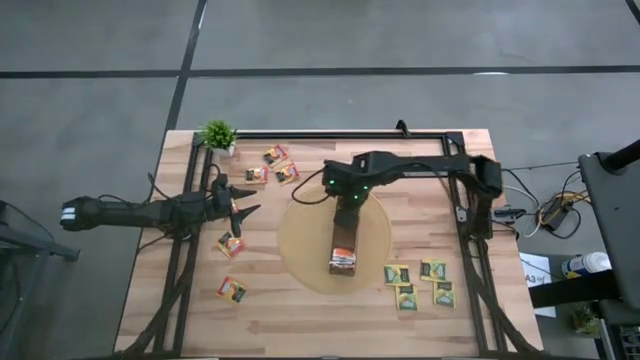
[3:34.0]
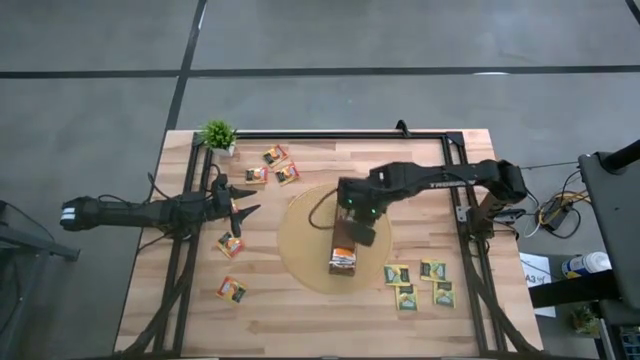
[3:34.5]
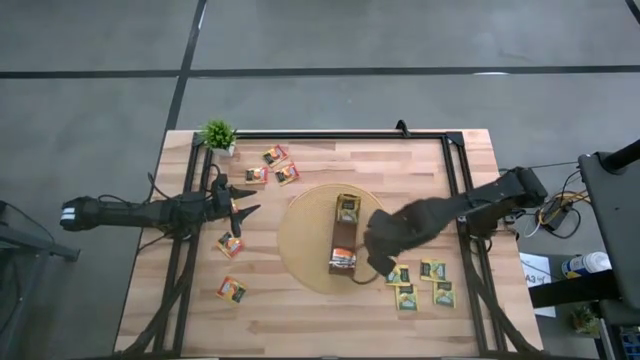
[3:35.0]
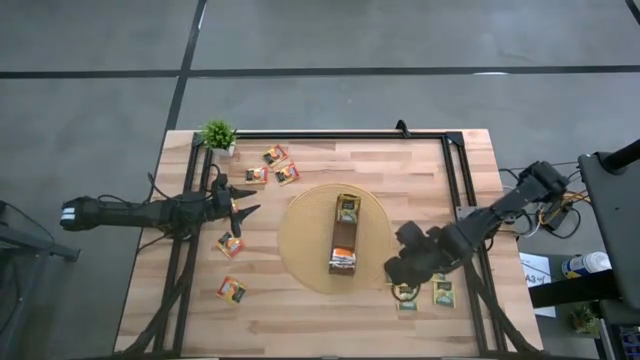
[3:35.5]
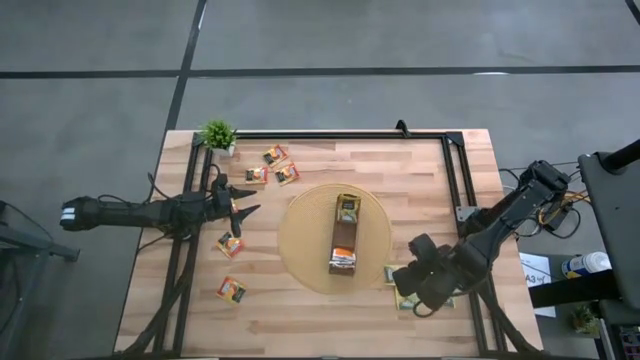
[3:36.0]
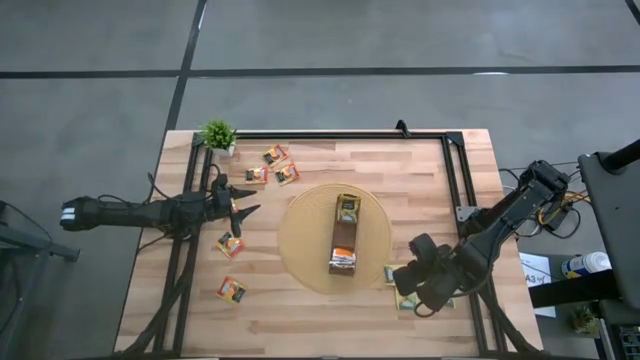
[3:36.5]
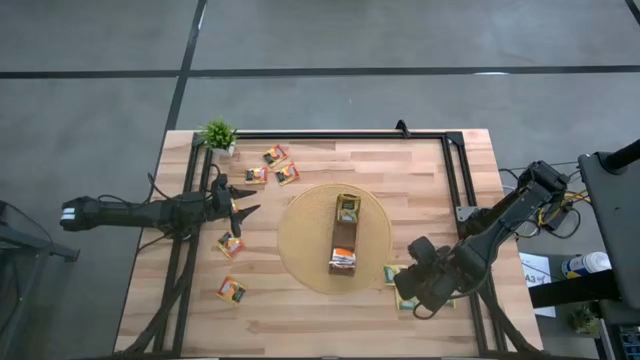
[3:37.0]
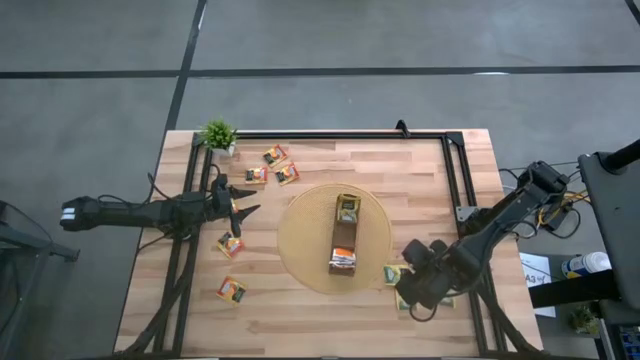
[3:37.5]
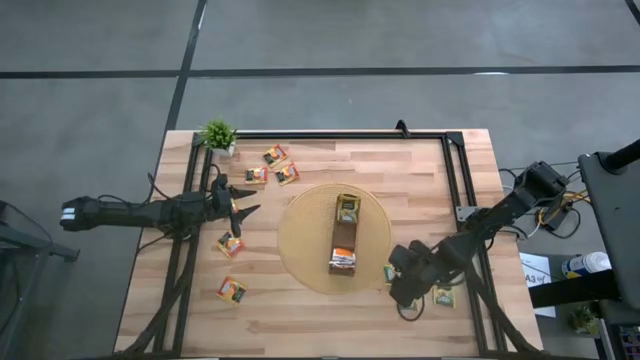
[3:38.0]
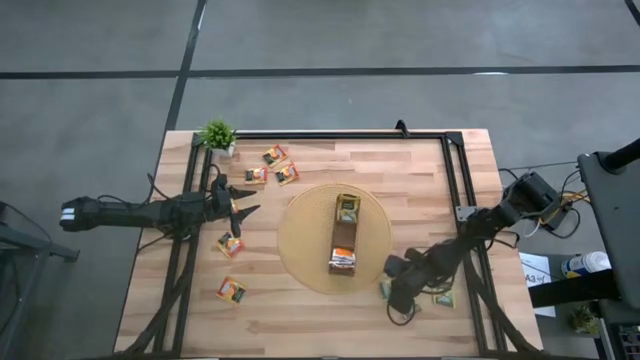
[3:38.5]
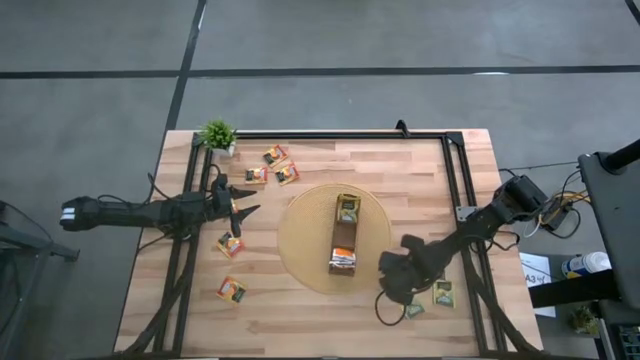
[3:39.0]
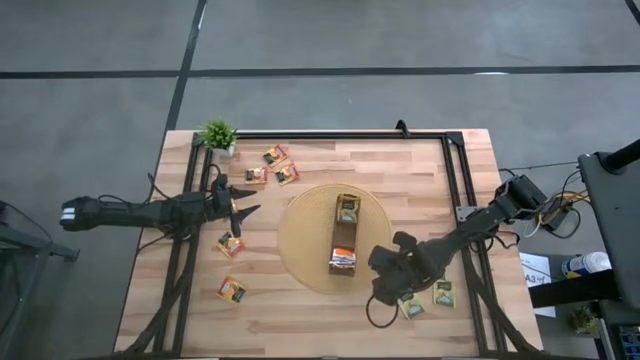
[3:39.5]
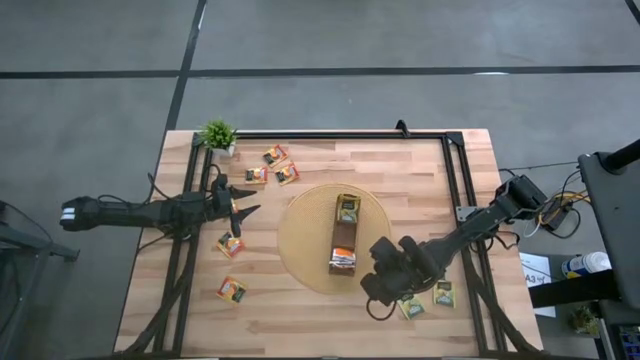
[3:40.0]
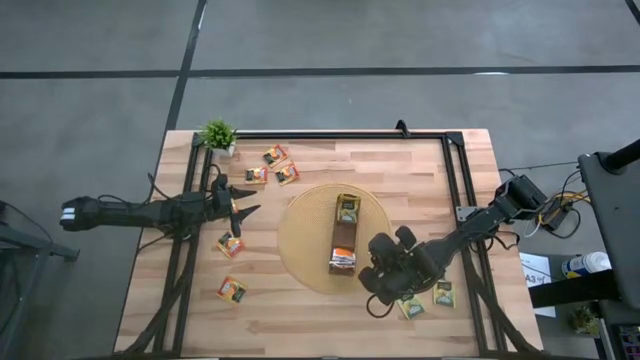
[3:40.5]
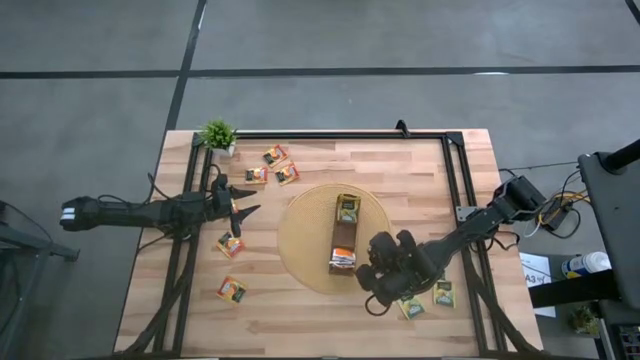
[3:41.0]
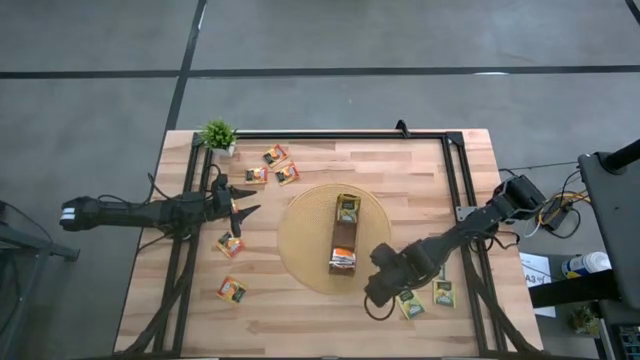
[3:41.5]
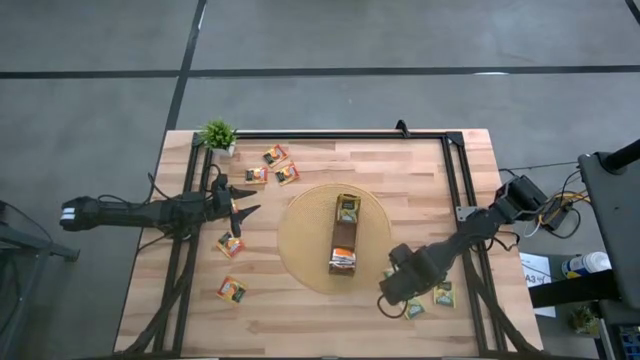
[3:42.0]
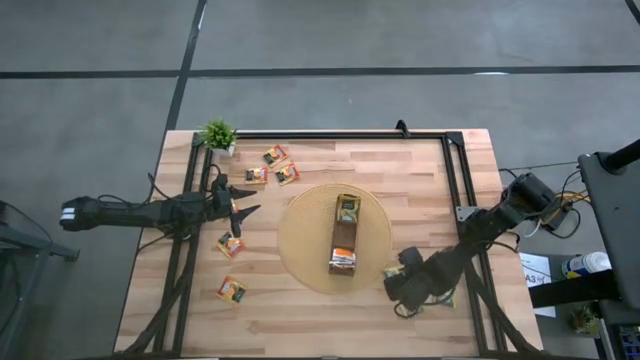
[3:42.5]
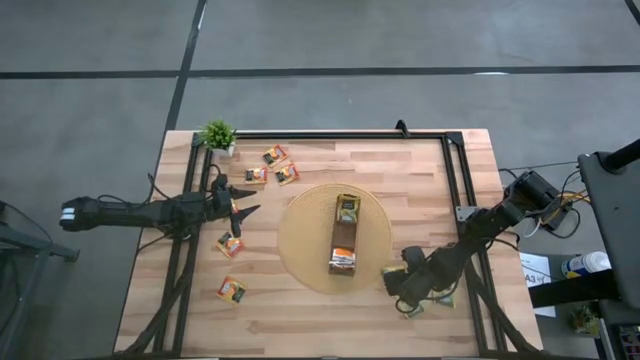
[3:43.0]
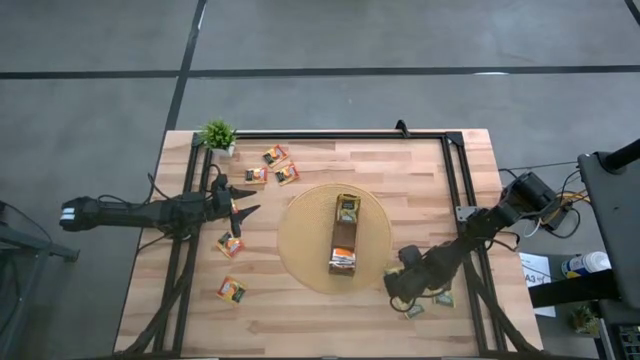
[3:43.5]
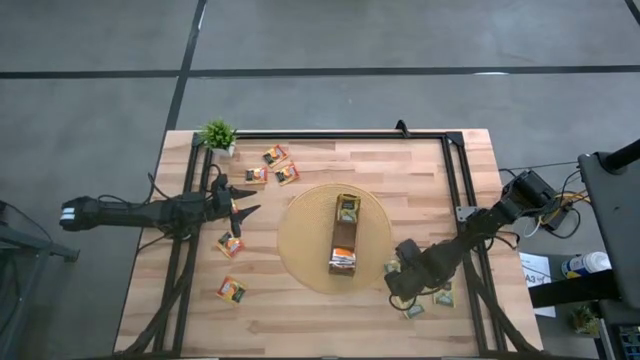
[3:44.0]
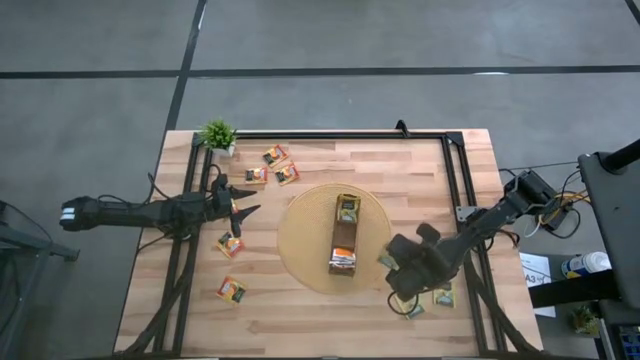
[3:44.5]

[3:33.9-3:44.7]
Task: Pick & Place Tea
Put the yellow tea bag into the top section of the wooden organizer

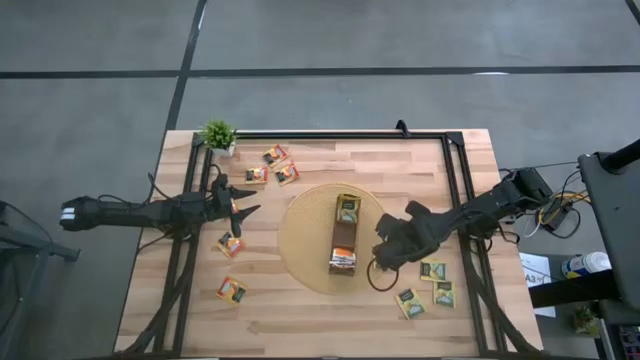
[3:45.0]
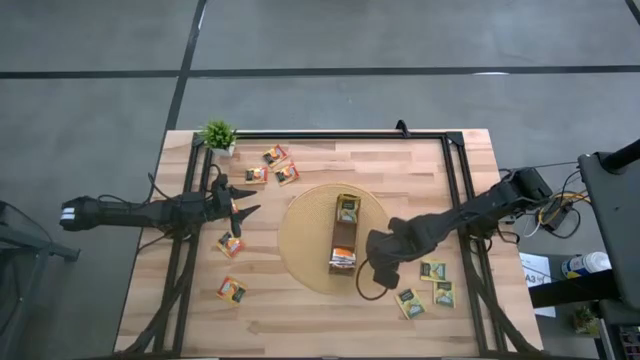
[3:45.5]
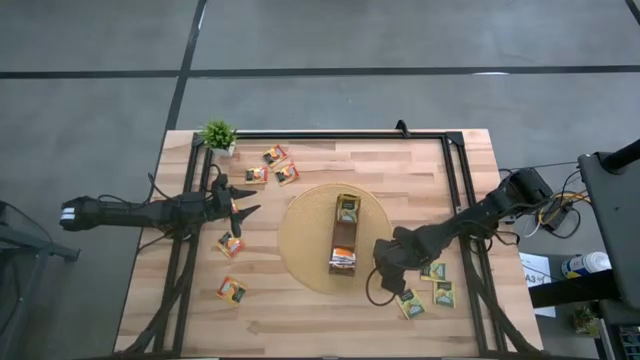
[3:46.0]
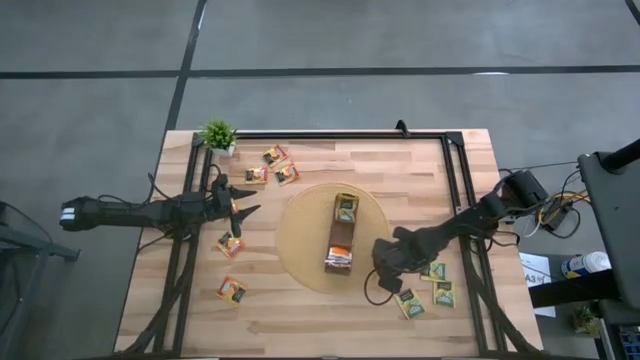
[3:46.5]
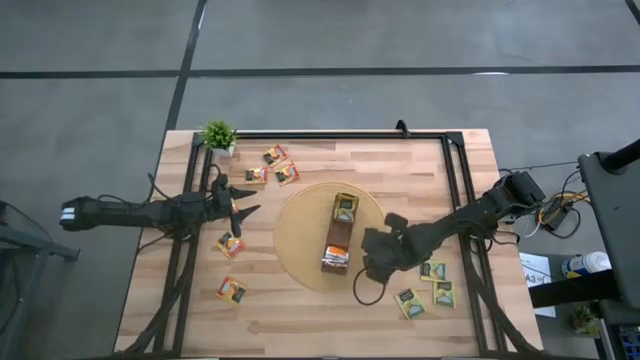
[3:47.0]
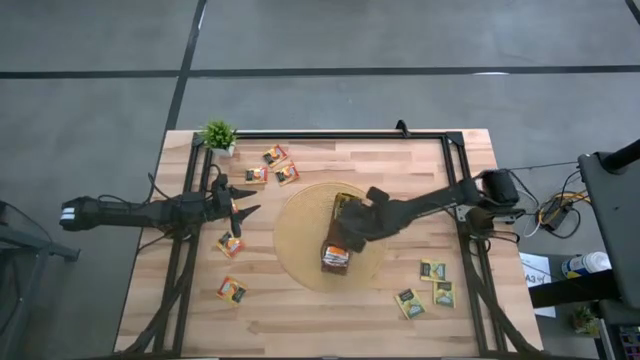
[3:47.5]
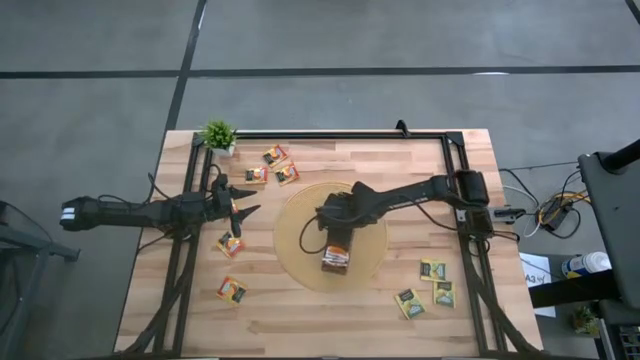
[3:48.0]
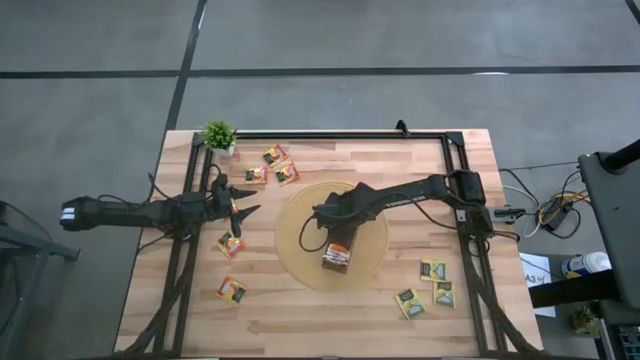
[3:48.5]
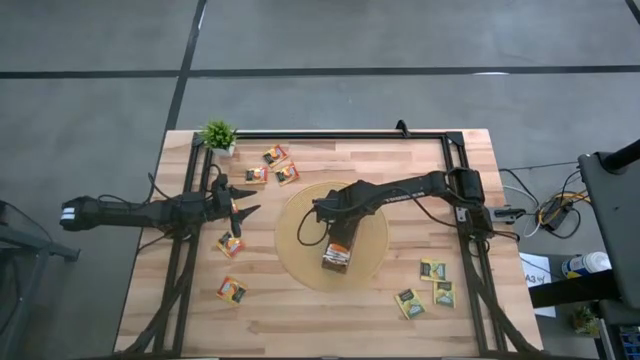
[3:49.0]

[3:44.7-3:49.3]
Put the yellow tea bag into the top section of the wooden organizer

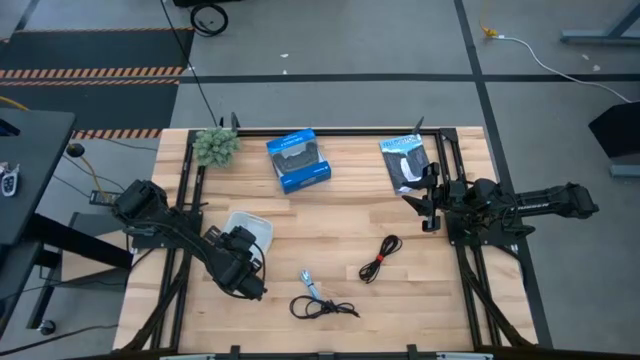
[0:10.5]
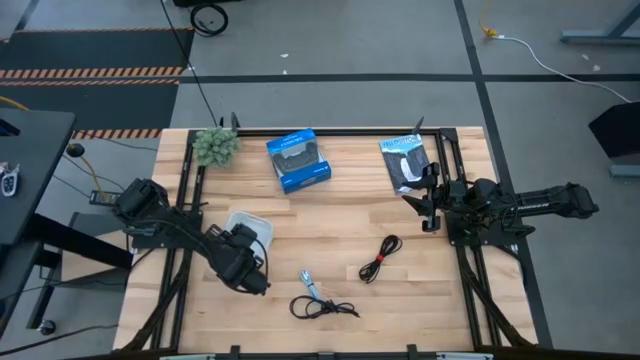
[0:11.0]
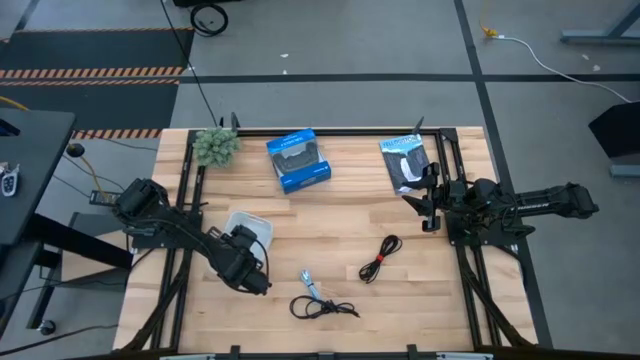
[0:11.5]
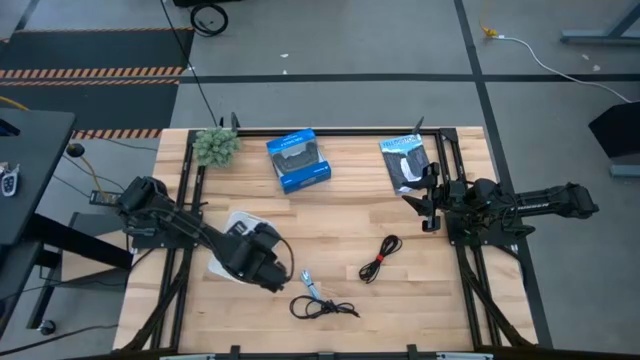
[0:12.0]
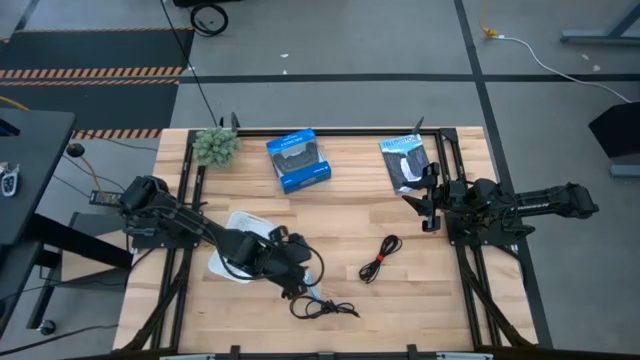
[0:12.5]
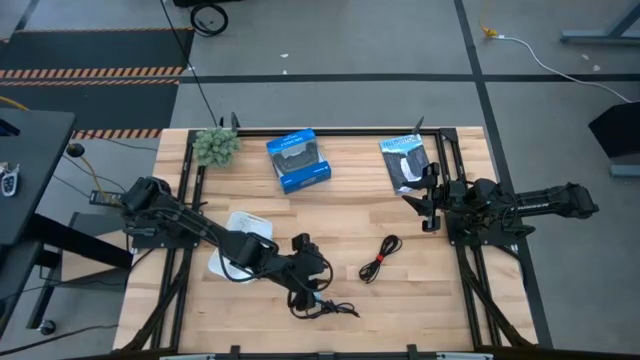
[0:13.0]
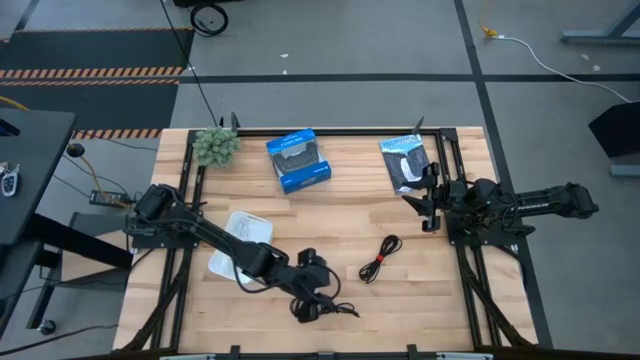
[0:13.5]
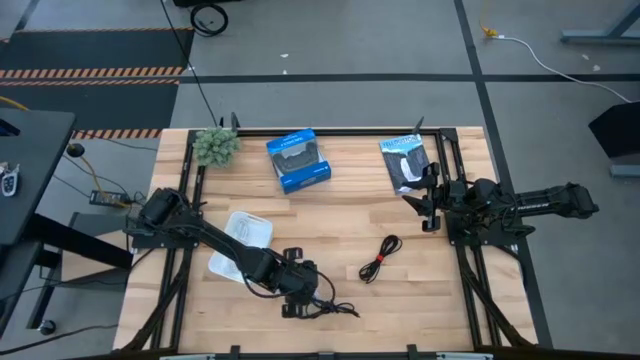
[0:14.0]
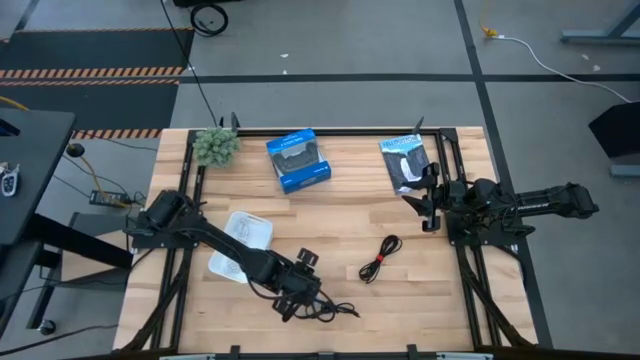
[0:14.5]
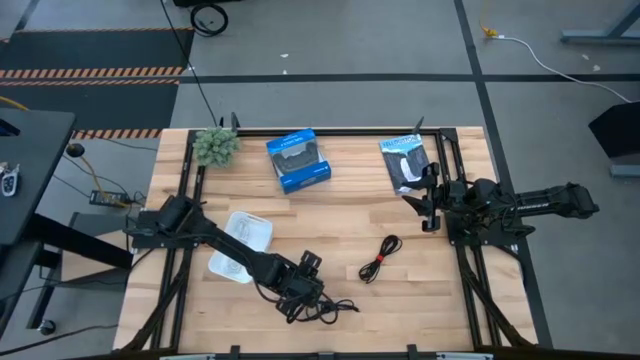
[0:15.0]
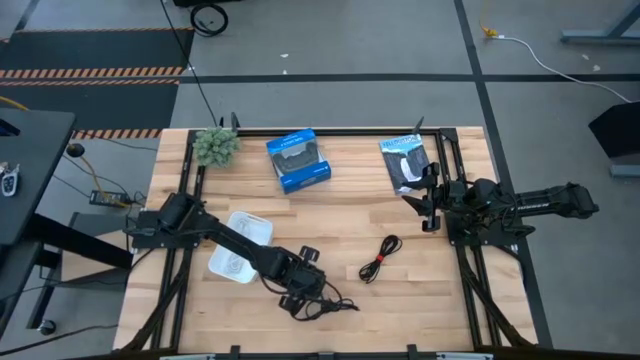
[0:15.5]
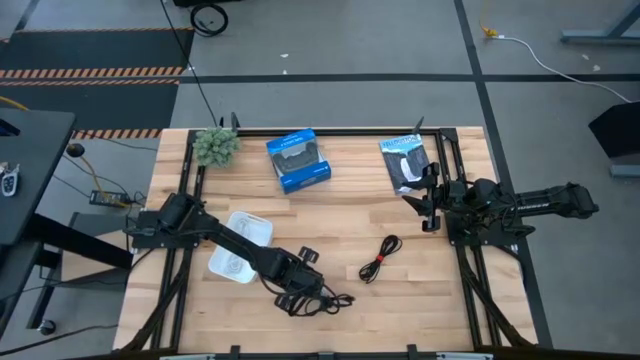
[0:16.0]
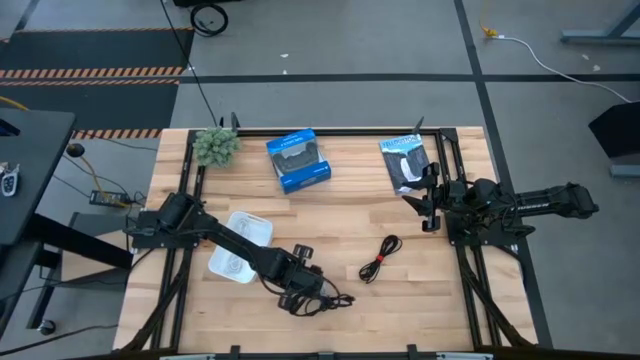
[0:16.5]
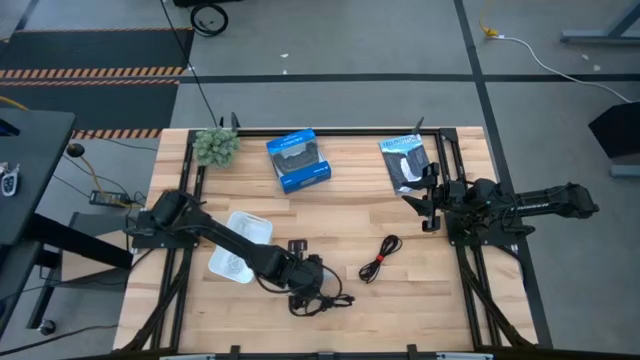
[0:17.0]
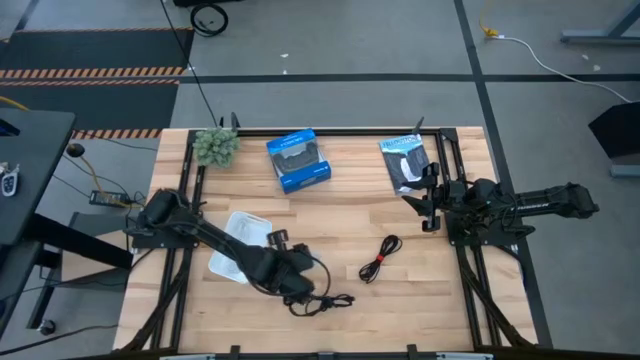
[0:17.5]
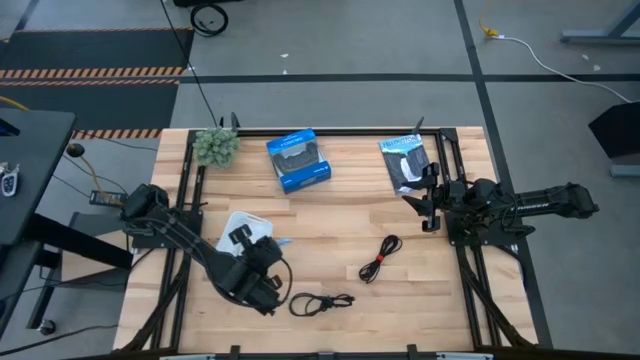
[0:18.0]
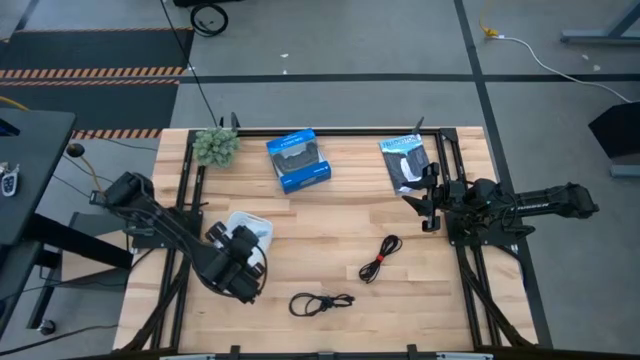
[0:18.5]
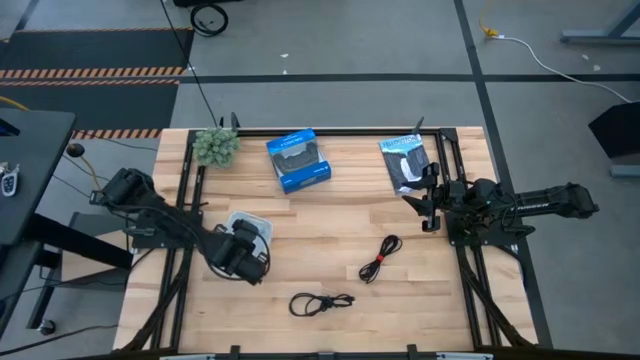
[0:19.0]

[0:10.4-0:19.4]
Task: Pick and place USB-C Cables
Put the blue charger cable into the white bin
